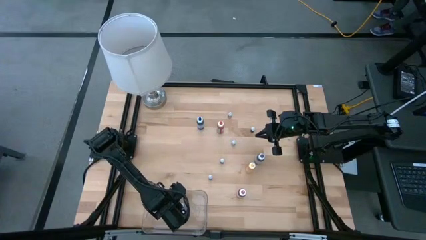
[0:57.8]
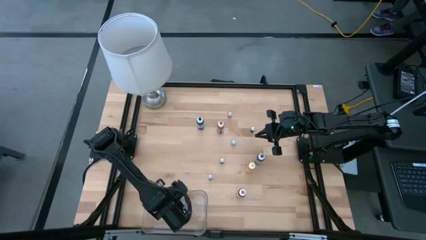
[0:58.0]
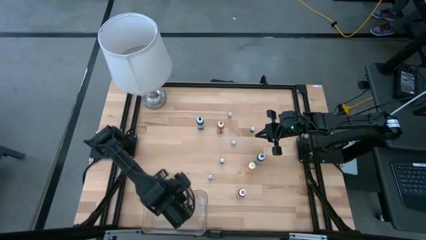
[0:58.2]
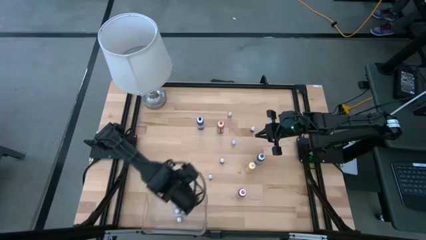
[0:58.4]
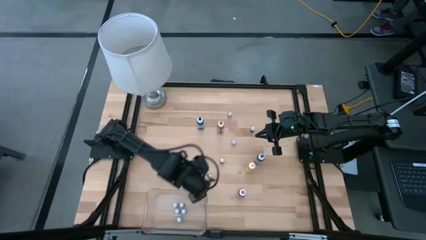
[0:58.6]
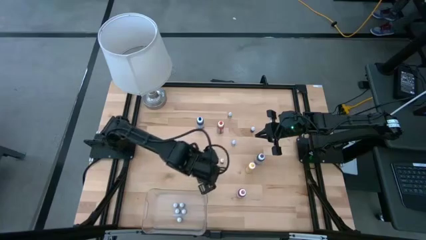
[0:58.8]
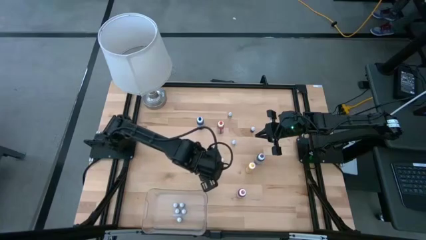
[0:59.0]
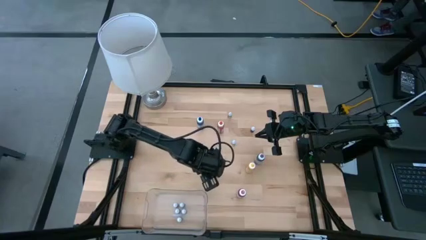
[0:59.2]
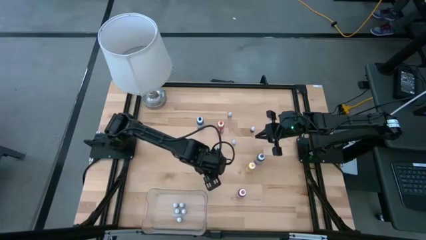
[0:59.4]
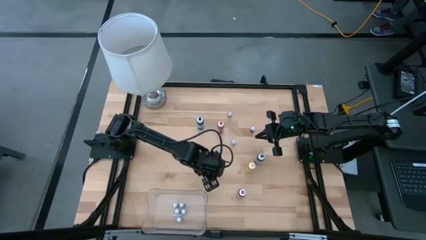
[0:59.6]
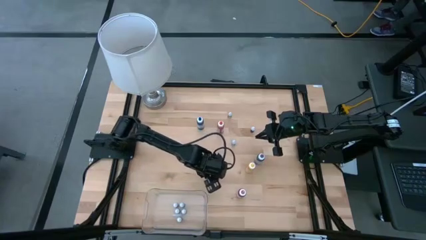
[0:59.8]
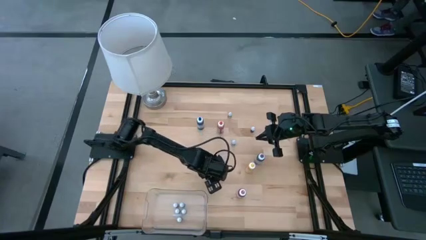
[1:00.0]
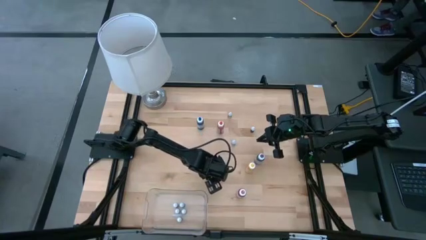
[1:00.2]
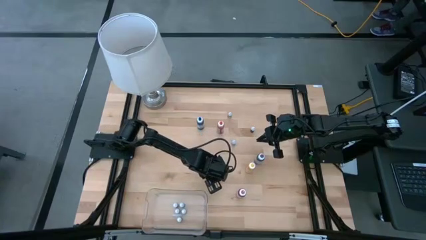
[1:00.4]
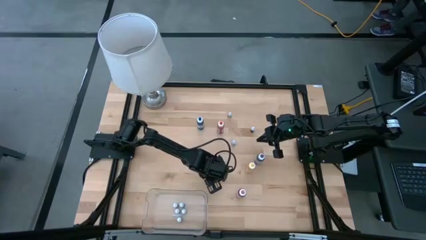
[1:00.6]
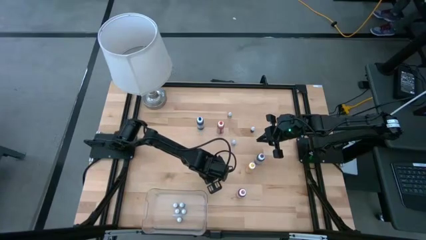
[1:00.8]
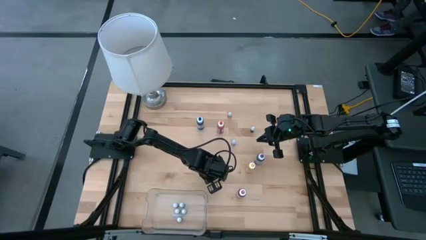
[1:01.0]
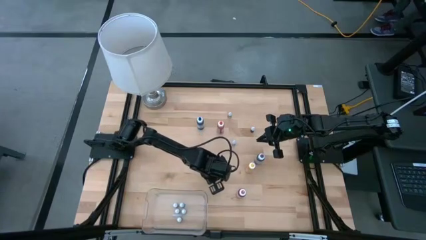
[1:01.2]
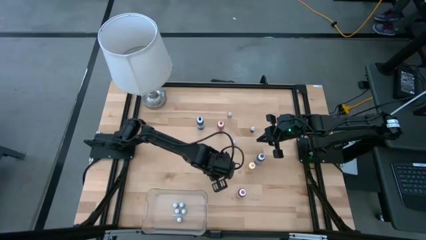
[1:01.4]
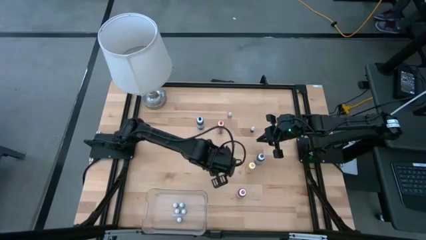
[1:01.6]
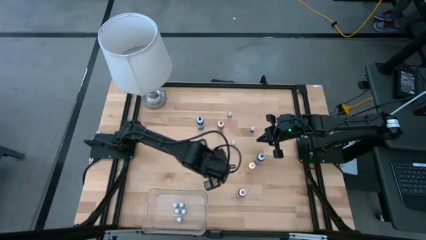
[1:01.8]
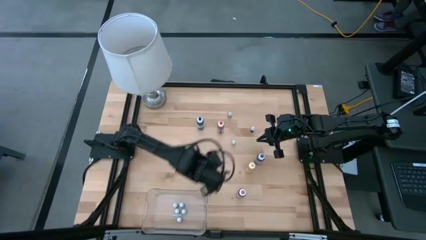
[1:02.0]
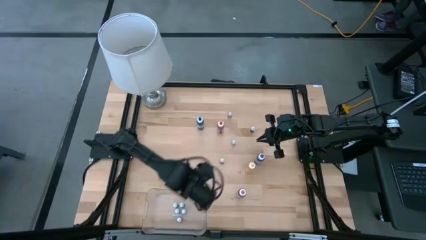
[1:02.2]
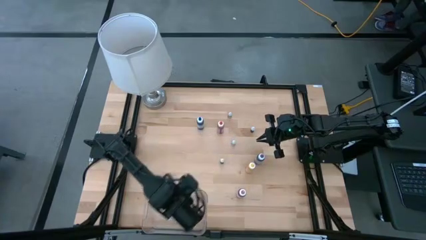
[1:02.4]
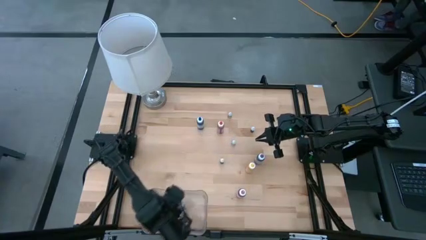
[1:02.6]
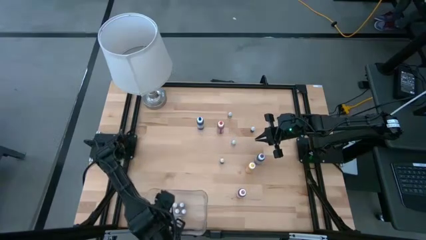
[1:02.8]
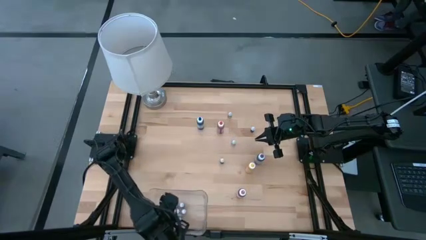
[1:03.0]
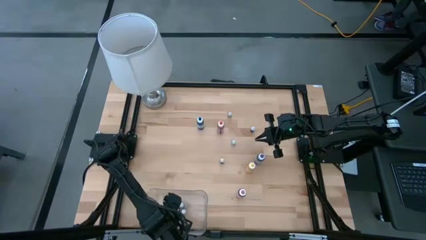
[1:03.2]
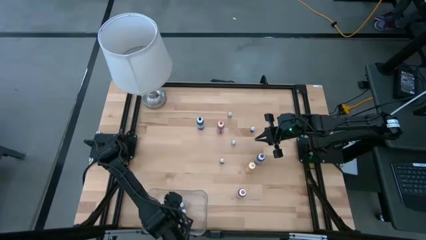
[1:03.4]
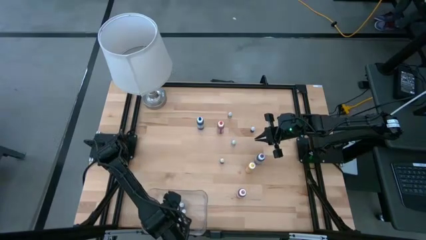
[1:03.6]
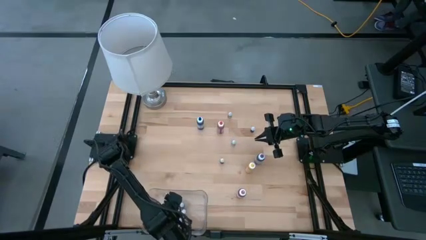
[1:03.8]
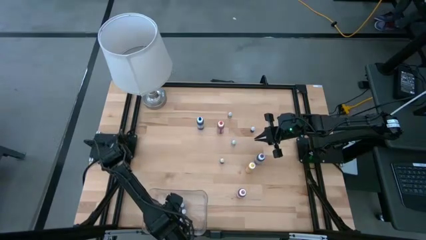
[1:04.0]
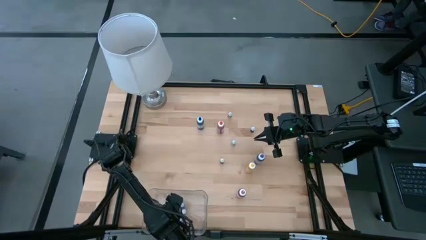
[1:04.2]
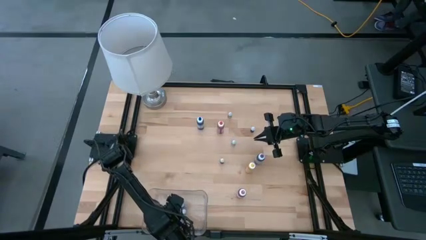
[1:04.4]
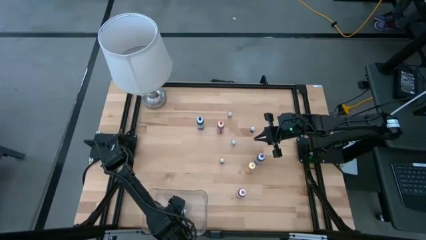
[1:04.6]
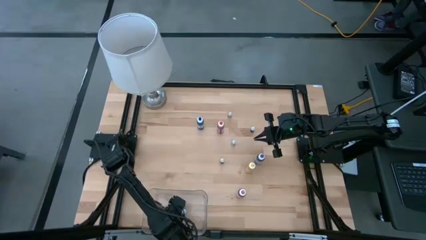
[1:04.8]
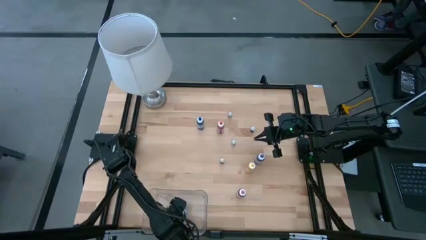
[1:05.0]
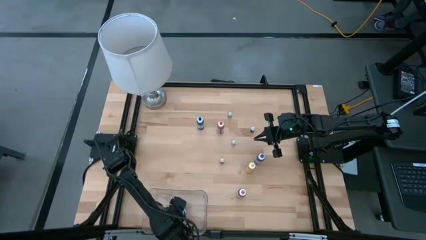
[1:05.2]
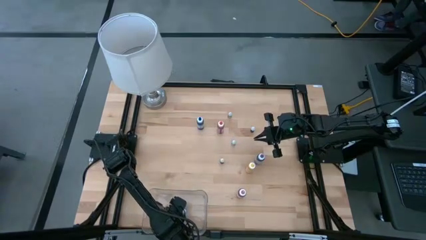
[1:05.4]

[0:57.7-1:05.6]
Task: Pick & Place food coloring
Put the small red food coloring bottle into the bin

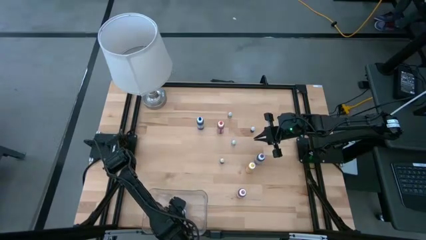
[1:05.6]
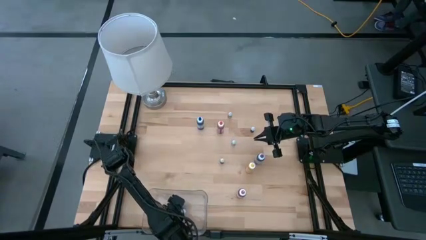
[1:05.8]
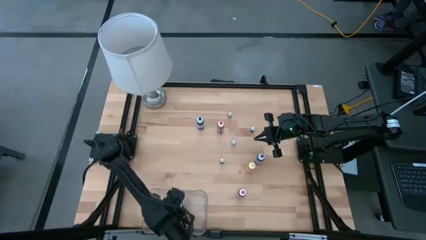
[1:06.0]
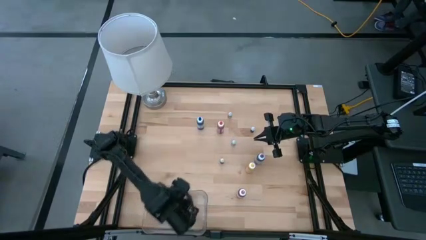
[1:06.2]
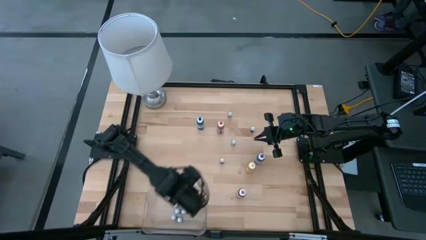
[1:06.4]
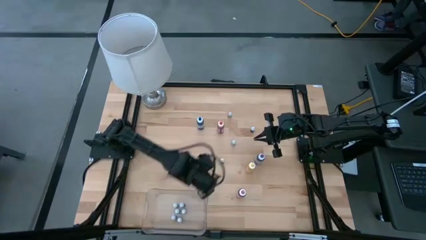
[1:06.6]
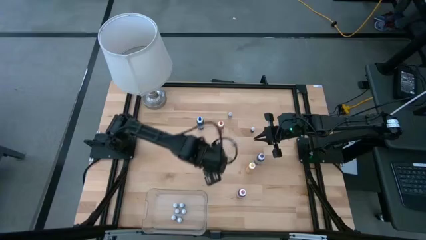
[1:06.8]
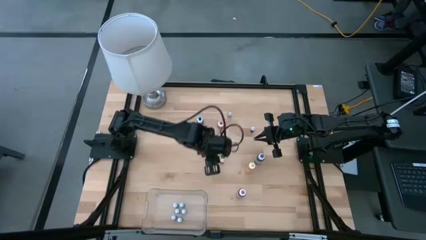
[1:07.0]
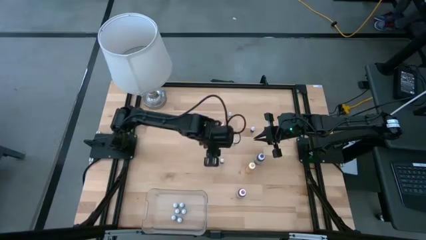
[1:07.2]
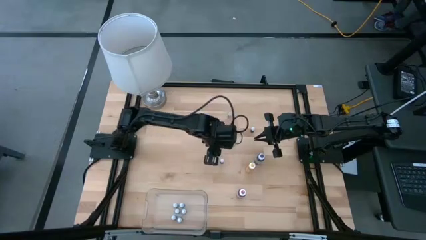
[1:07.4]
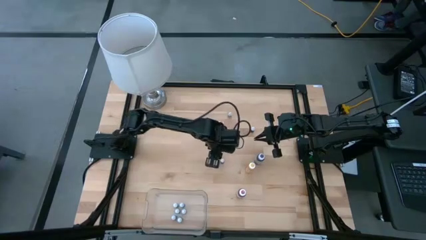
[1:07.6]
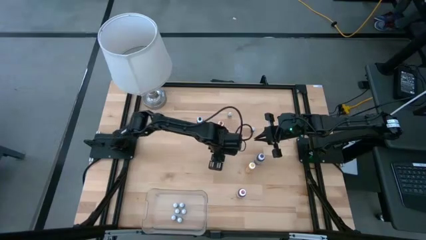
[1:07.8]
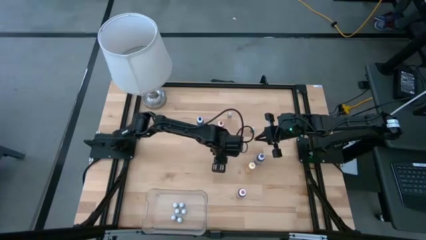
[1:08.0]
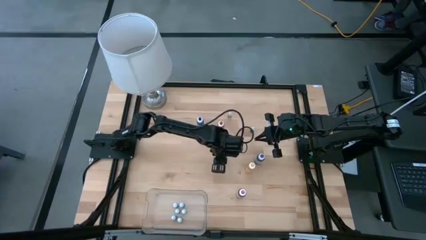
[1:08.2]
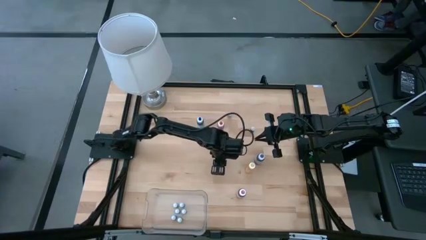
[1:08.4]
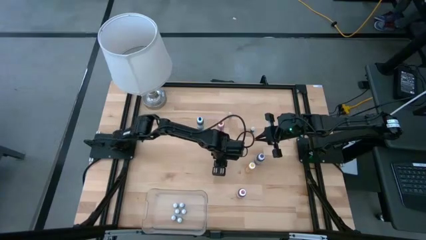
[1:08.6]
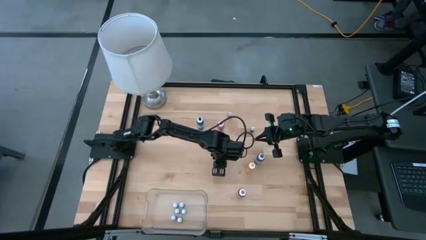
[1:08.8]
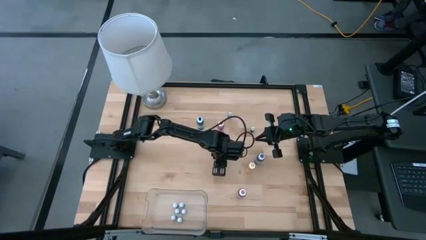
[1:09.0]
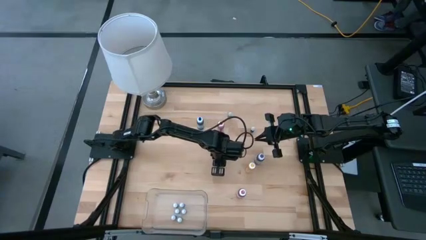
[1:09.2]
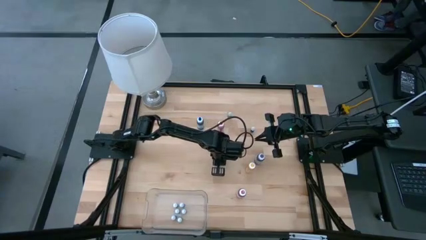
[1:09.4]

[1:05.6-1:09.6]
Put the small light green food coloring bottle into the bin

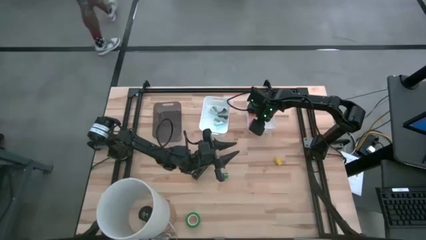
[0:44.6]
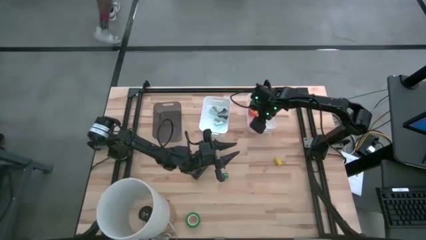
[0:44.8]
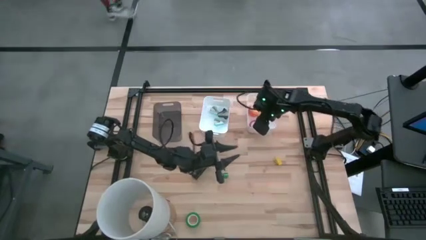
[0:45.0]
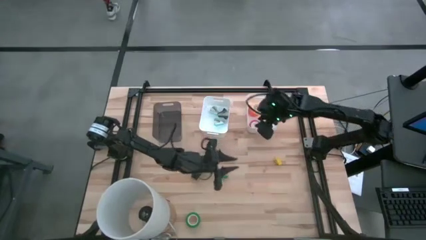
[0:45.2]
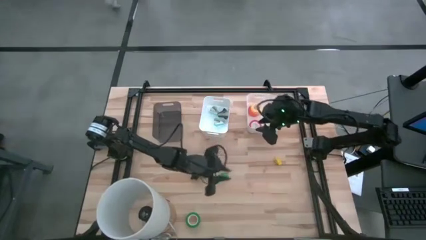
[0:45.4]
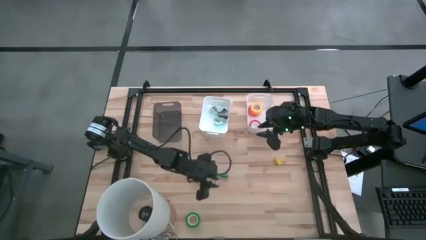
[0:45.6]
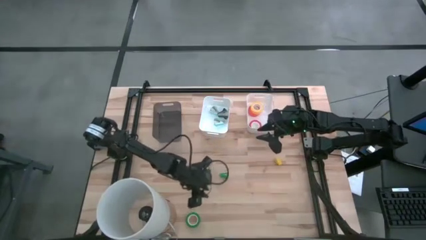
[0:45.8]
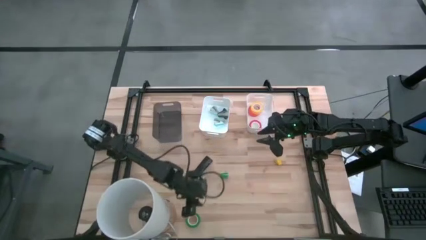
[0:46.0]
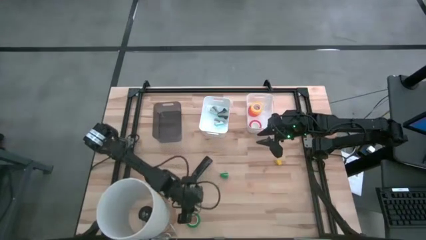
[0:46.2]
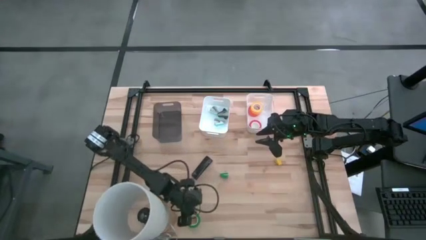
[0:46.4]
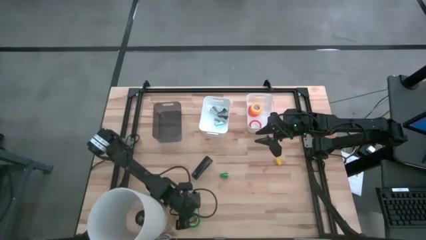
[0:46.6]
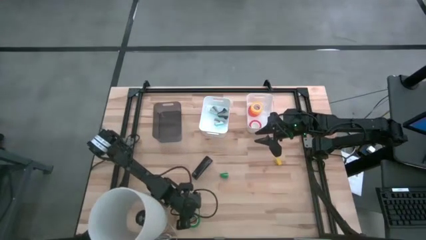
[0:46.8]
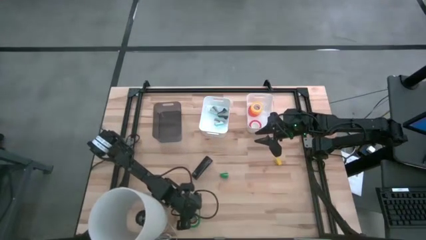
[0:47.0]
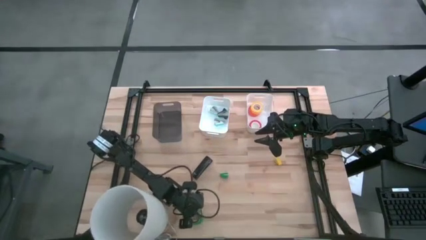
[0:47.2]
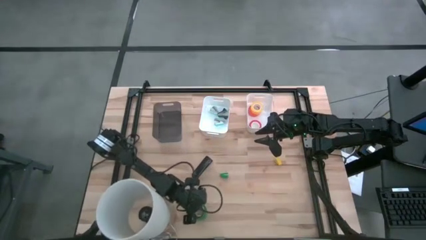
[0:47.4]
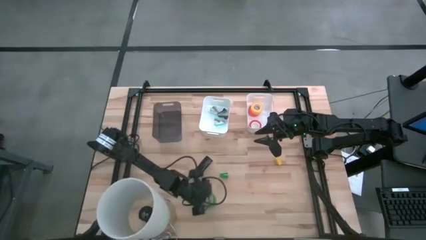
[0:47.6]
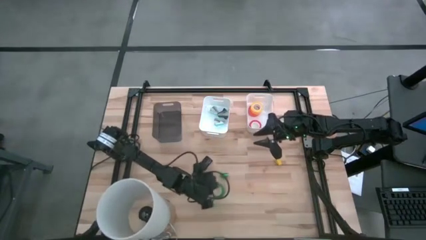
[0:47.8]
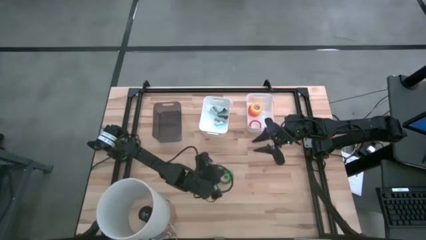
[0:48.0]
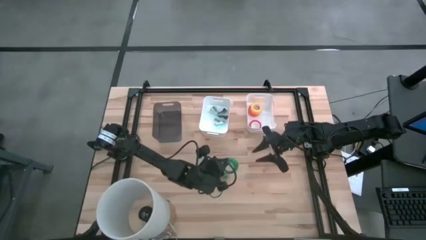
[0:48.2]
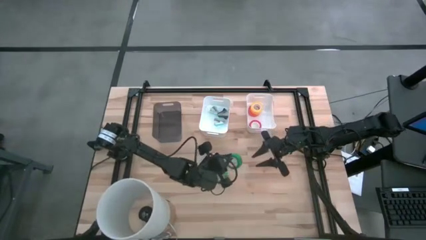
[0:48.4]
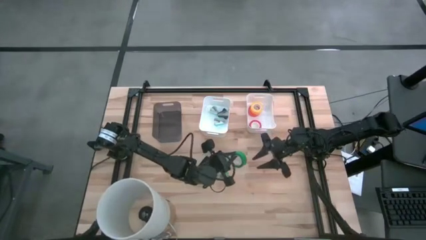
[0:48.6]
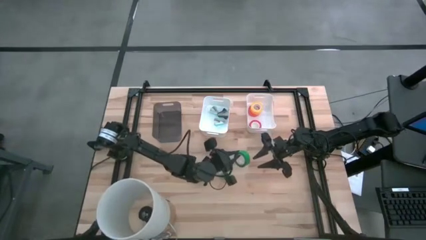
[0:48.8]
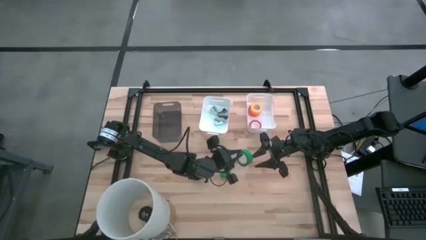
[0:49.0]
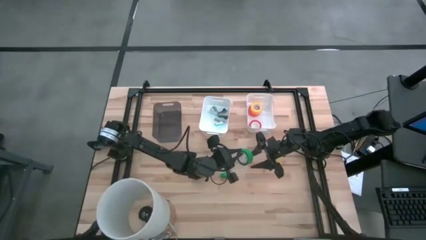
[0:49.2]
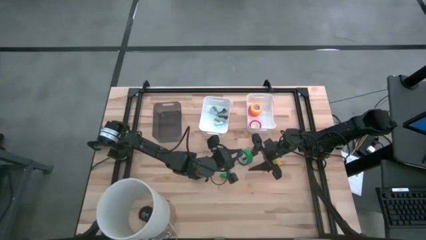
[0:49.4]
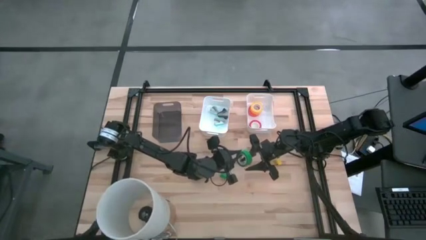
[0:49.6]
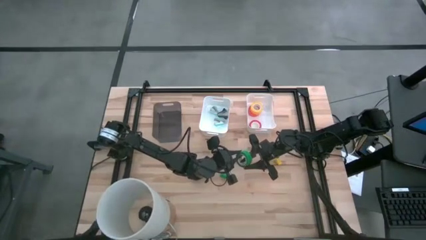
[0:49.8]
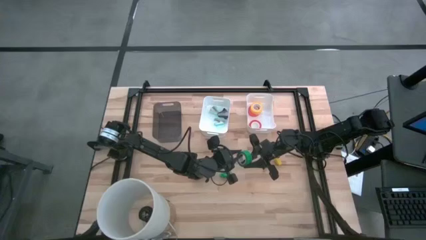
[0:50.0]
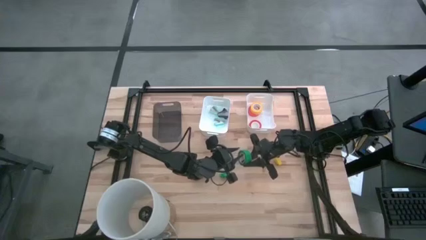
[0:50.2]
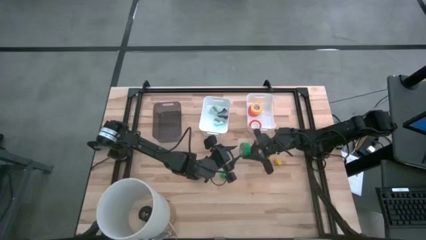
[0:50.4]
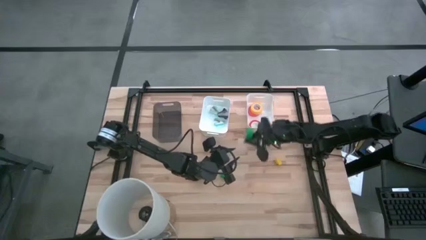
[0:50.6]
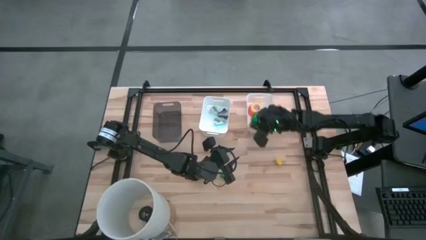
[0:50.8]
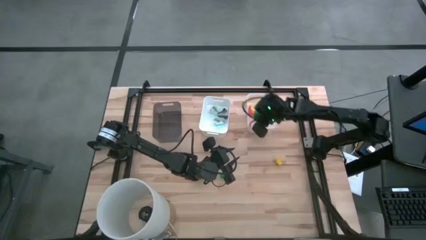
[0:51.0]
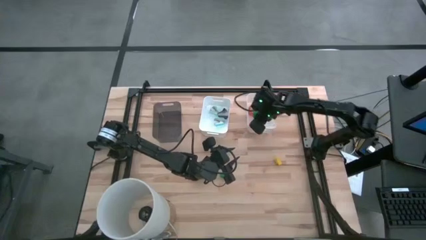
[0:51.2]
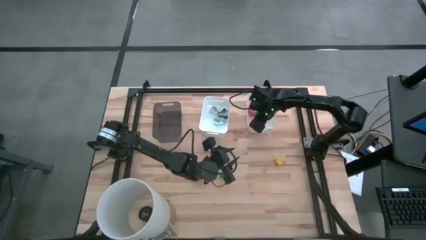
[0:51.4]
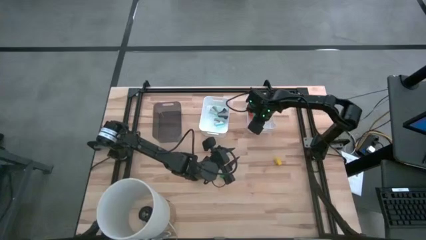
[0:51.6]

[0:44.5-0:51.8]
Task: Pick and place Stapler, Stapler remover, tape
Put the green tape into the right white bin
